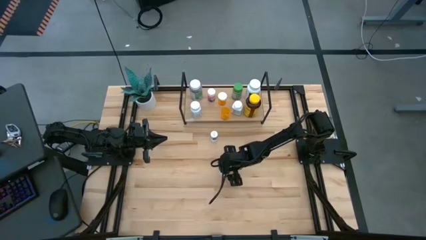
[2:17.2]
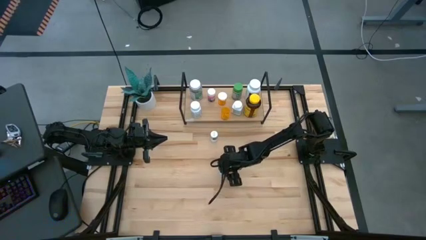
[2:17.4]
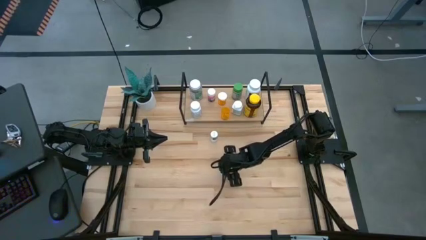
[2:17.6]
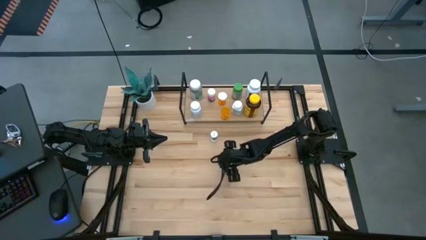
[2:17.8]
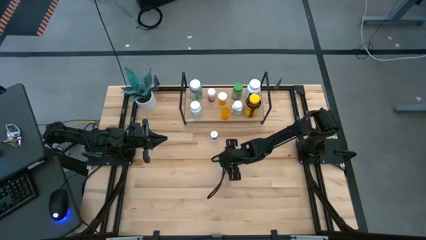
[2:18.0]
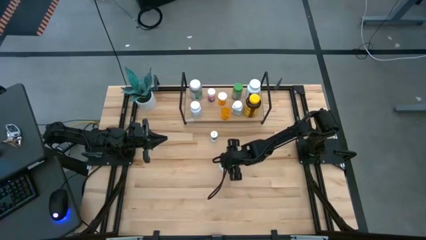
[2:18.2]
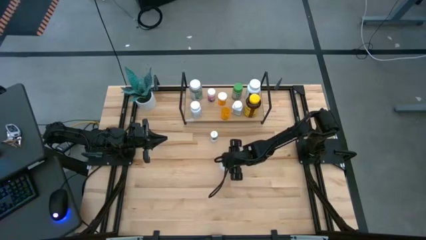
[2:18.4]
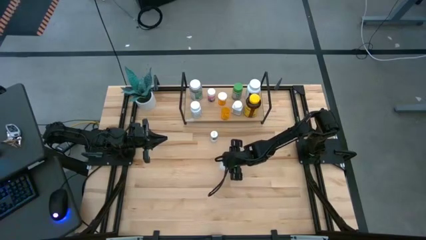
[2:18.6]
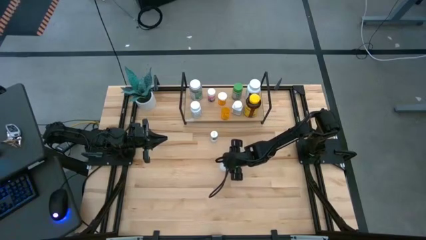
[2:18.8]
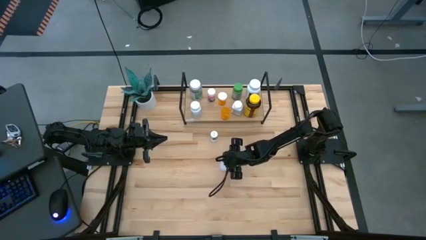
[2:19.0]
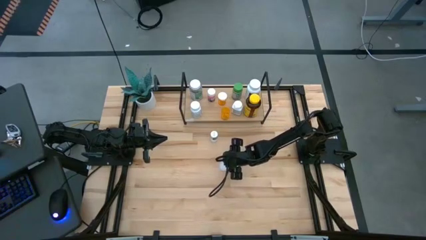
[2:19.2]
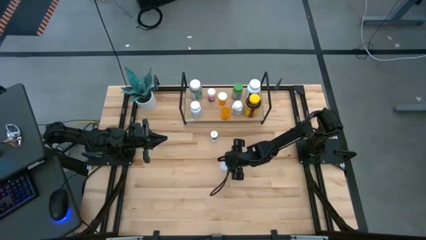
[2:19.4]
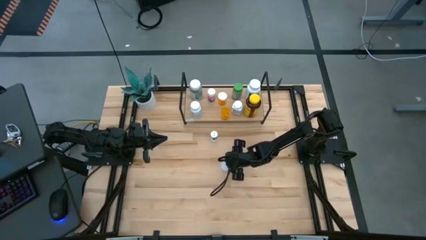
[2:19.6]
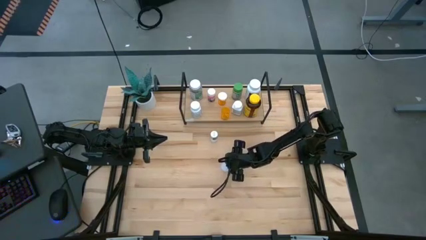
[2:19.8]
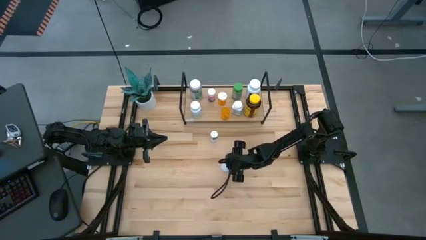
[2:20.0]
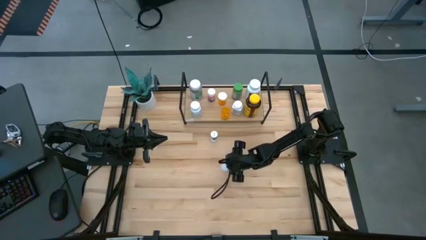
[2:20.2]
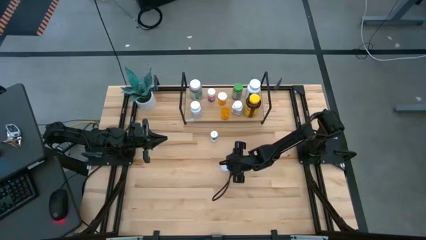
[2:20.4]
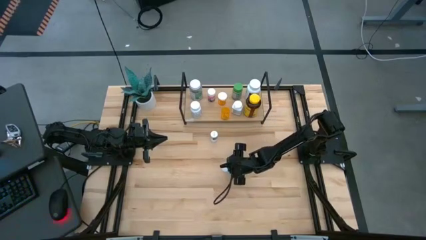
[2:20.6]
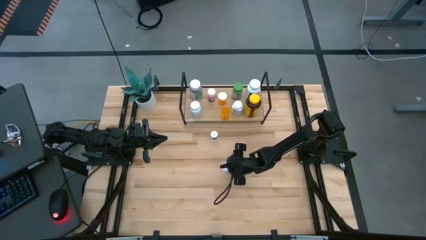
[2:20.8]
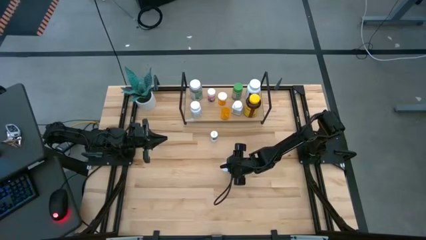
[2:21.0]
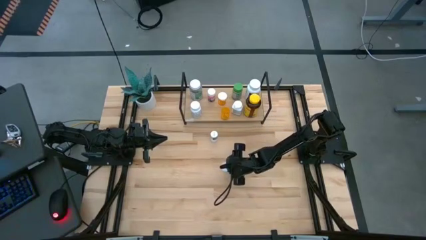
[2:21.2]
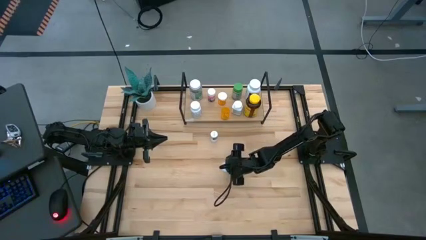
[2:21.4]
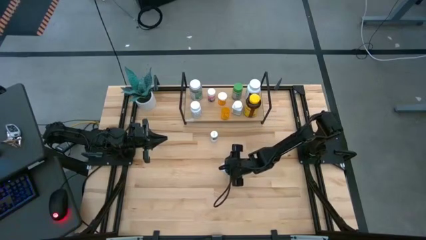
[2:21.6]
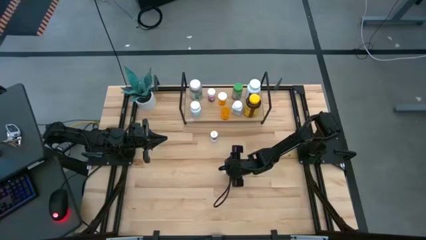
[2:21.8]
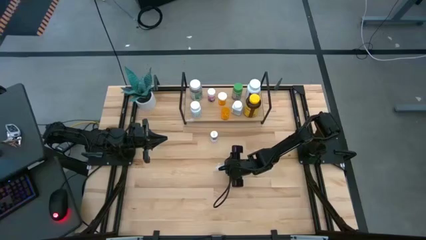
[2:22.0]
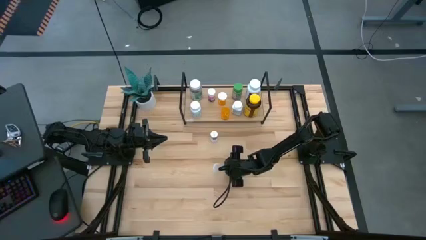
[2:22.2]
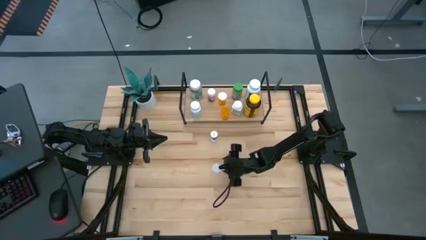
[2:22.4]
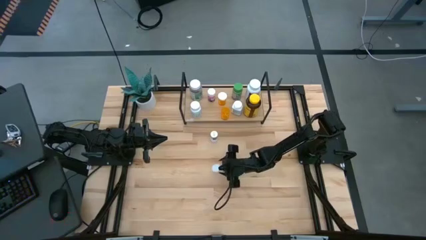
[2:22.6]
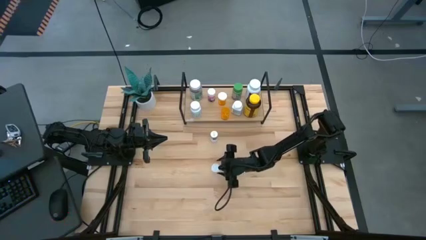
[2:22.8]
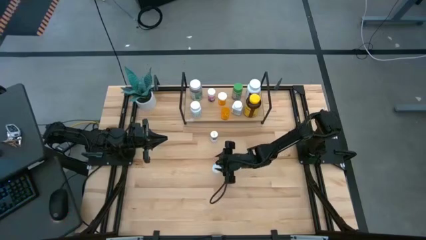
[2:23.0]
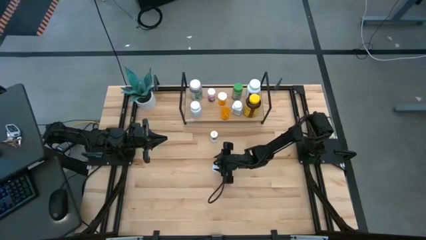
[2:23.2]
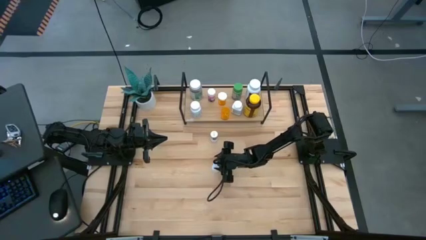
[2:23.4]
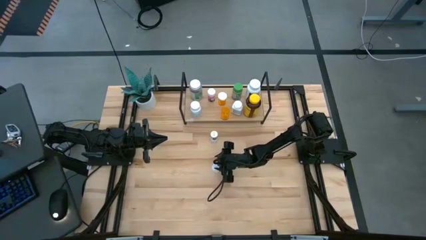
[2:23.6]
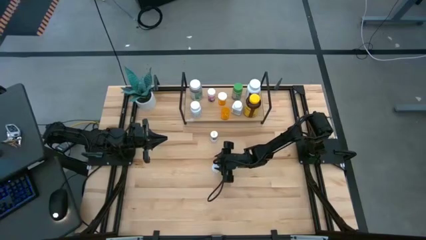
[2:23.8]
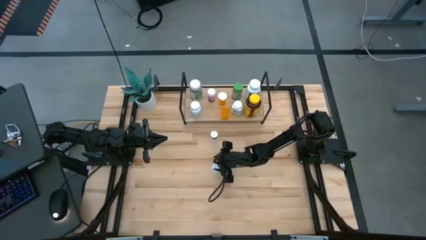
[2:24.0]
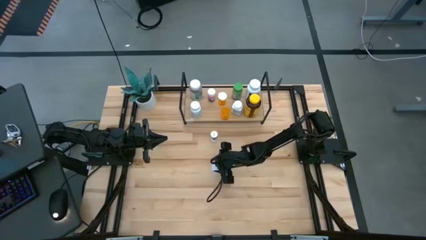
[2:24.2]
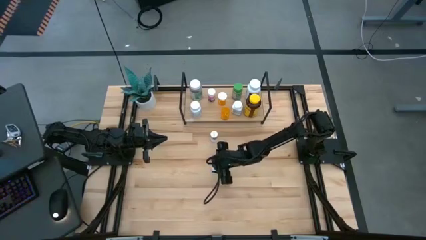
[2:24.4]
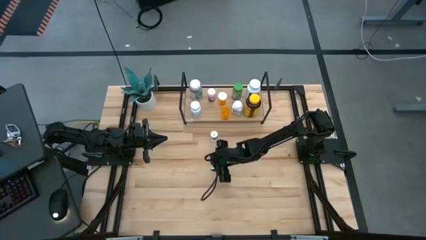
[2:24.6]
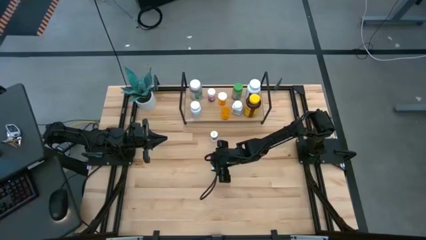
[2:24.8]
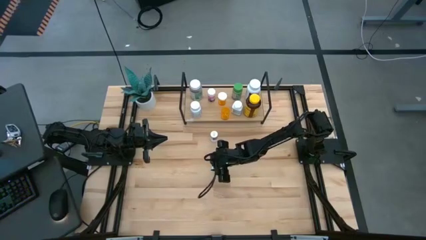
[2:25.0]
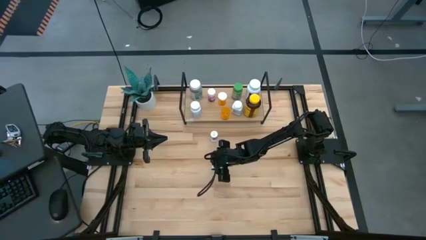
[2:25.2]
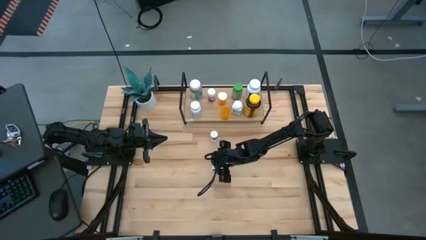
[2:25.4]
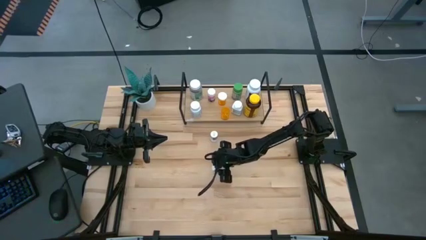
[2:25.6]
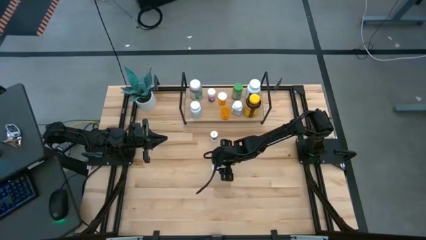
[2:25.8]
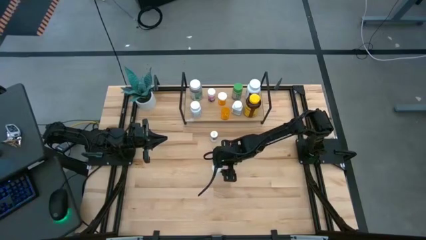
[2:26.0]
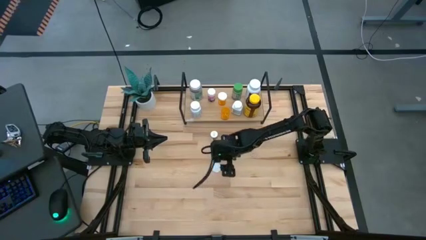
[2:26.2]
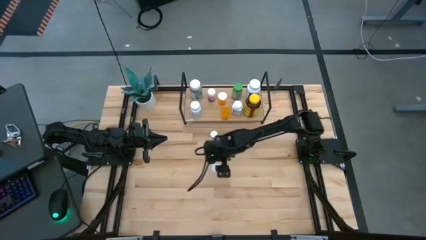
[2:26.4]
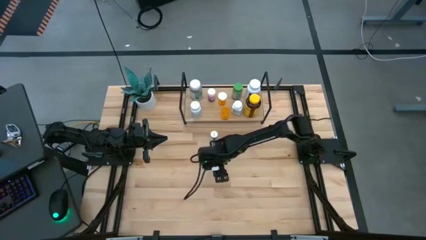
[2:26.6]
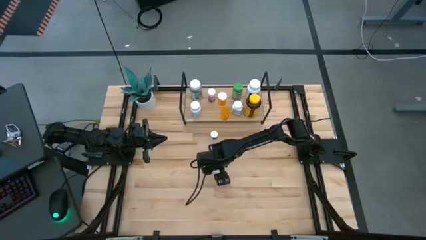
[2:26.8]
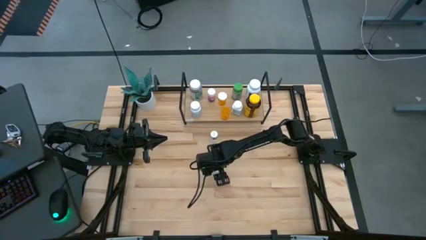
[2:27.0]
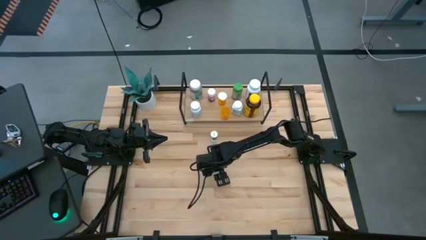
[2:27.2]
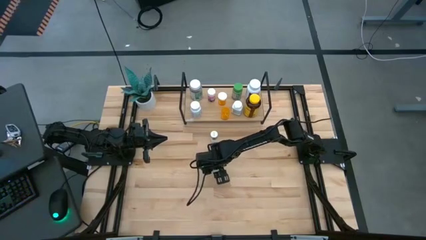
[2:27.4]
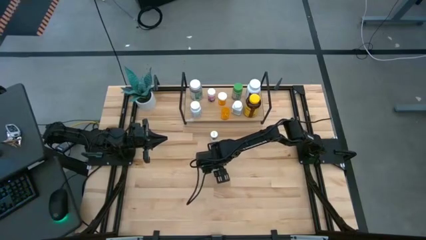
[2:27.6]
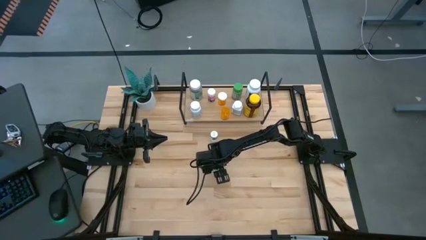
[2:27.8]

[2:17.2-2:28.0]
Task: Pick and place medicine bottles onto shelf by color
Close the yellow pill bottle

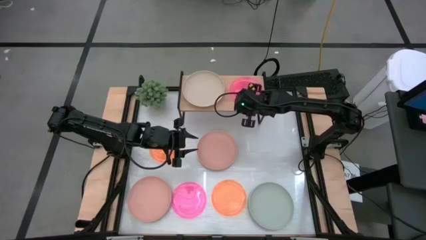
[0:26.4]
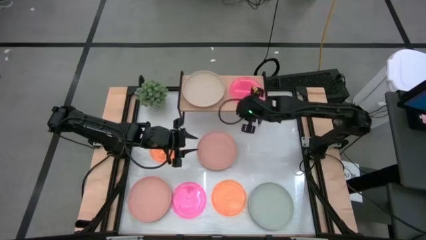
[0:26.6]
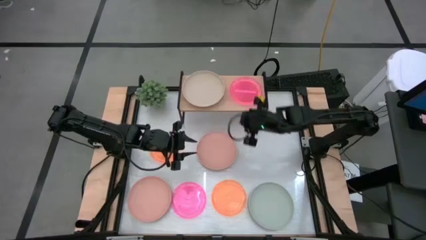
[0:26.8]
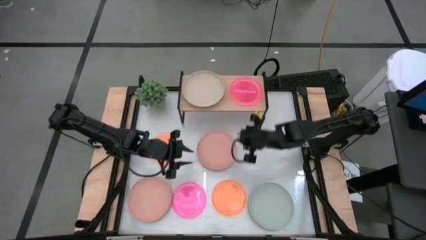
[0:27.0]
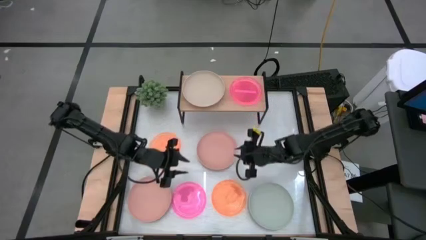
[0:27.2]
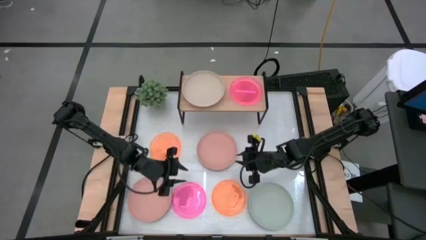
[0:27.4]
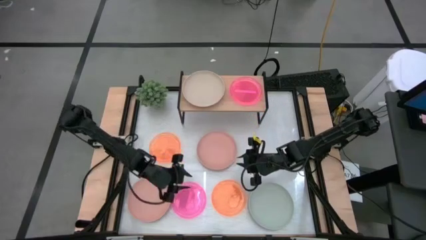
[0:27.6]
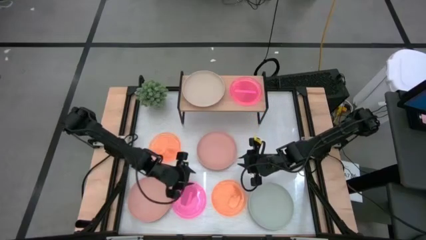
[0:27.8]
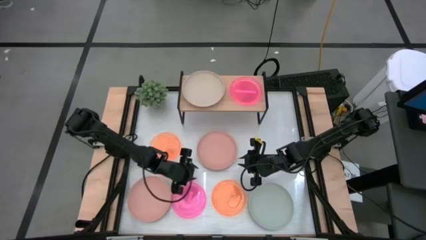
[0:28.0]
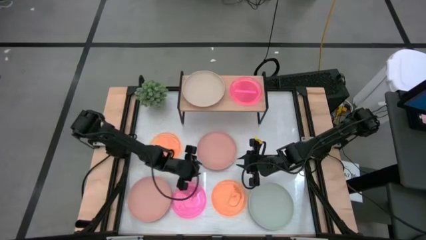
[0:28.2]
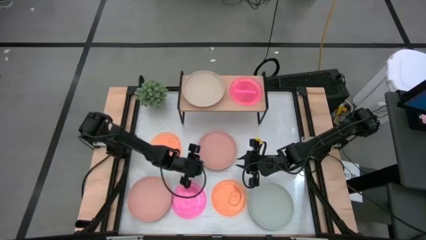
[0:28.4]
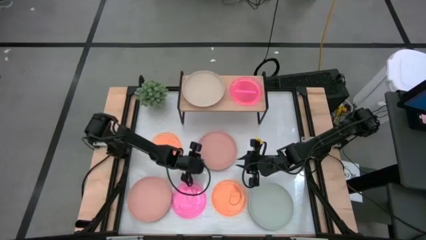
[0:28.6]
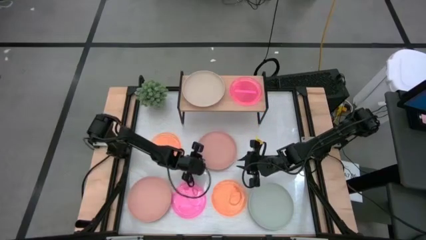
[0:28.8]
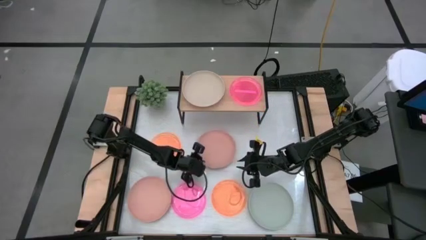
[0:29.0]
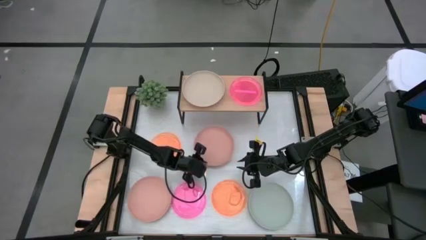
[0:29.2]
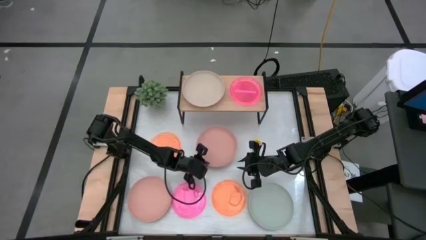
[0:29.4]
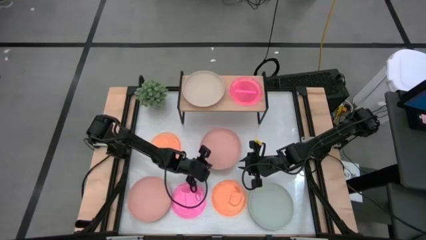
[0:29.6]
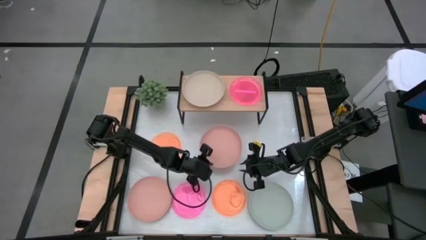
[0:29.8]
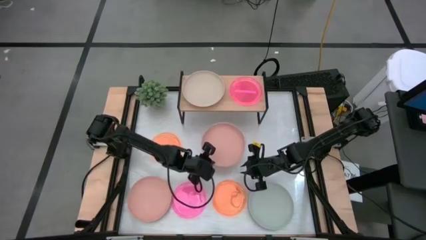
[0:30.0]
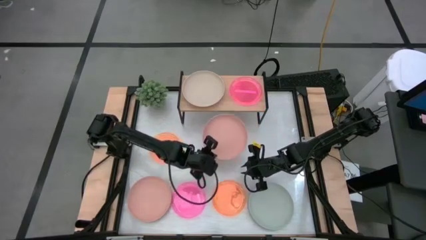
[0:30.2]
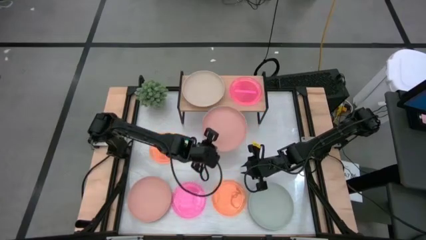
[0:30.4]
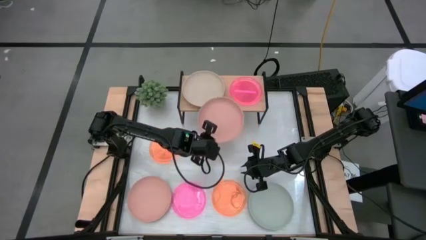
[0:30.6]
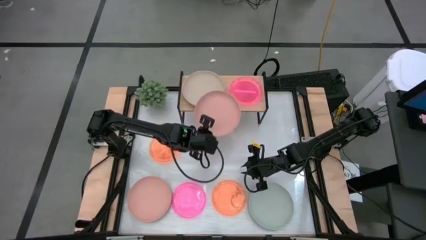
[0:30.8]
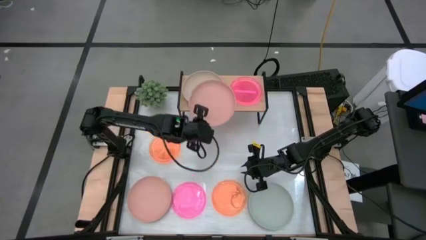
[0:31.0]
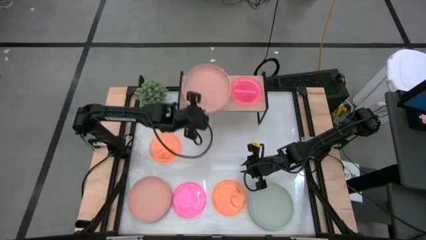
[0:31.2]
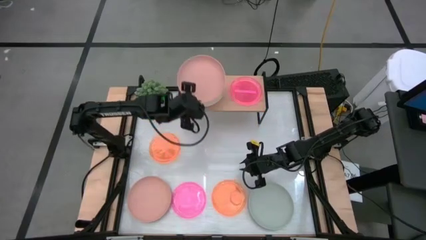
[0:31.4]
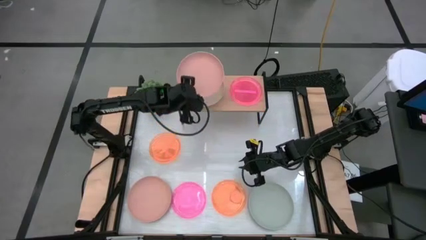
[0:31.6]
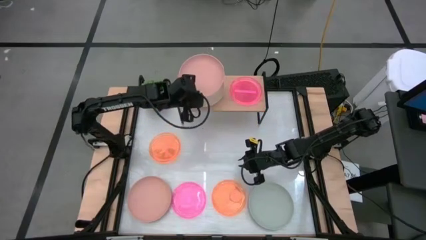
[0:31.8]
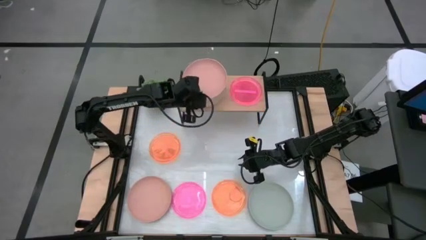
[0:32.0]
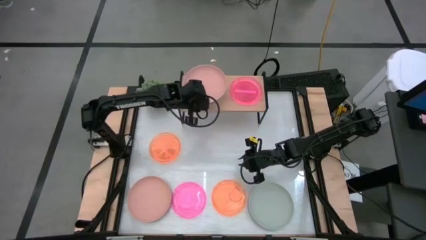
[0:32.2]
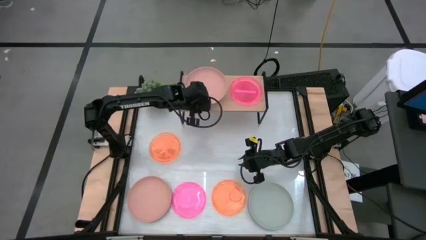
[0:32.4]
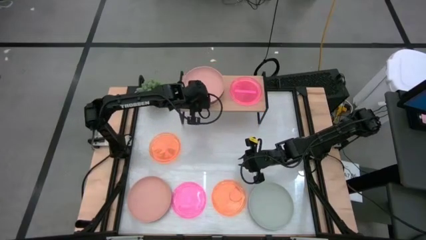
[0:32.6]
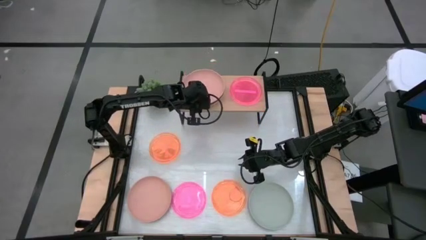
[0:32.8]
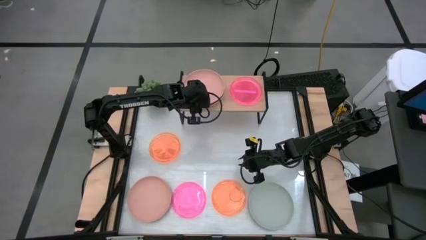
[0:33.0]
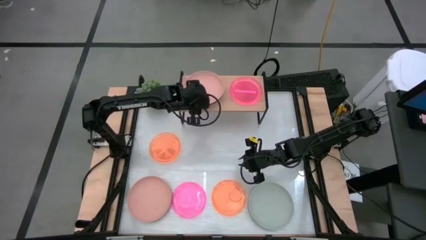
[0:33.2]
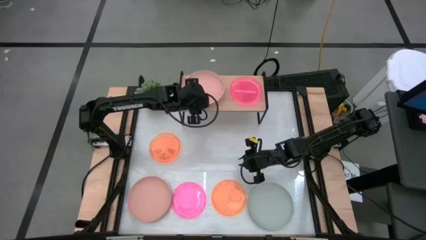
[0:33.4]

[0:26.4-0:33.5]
Task: Place and stack plates onto a shelf
Stack the top light brown plate on top of the white plate
